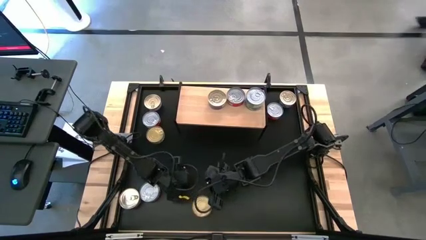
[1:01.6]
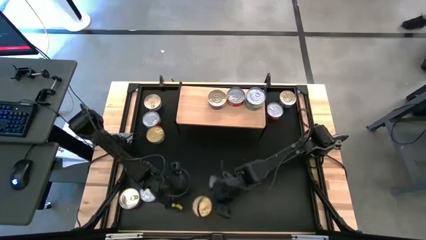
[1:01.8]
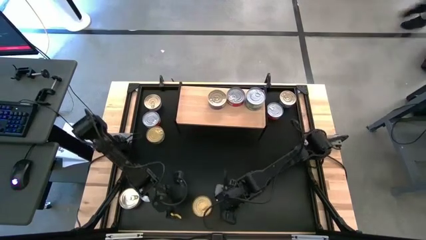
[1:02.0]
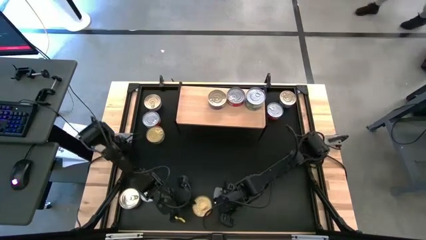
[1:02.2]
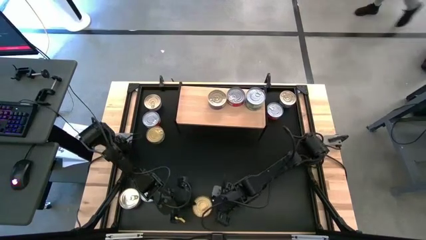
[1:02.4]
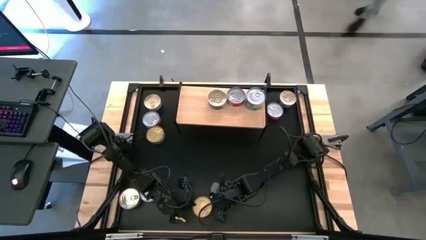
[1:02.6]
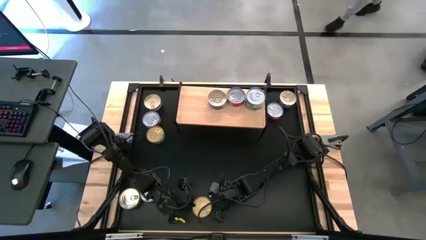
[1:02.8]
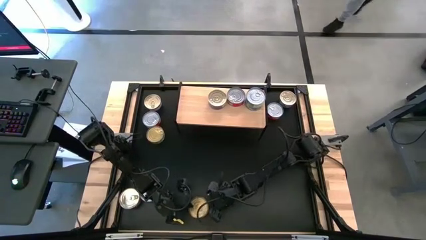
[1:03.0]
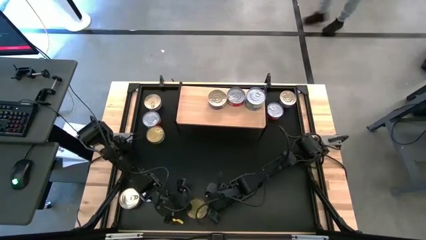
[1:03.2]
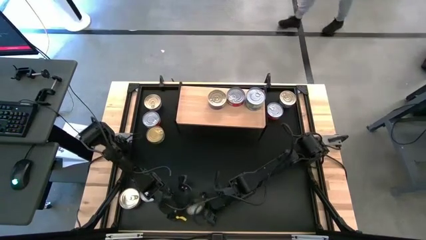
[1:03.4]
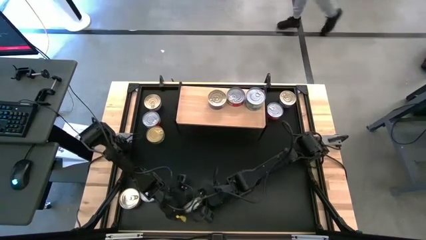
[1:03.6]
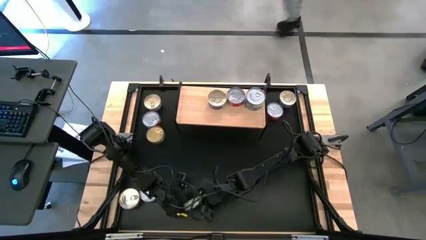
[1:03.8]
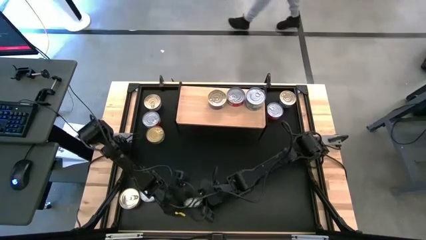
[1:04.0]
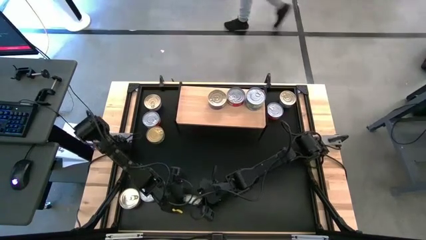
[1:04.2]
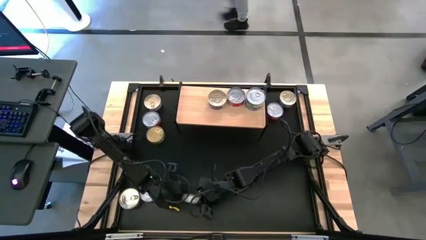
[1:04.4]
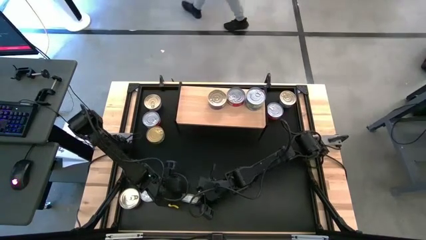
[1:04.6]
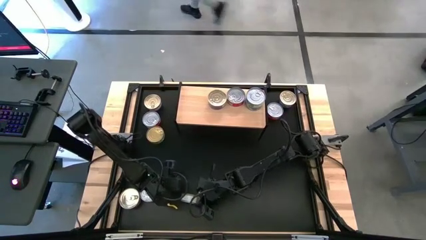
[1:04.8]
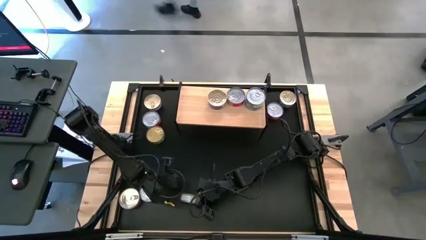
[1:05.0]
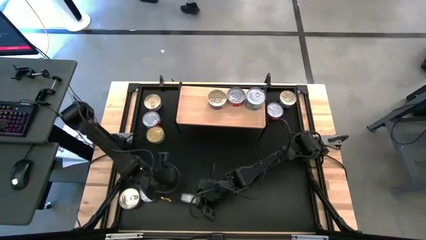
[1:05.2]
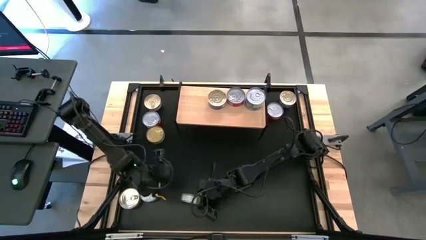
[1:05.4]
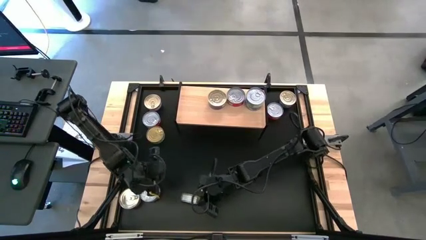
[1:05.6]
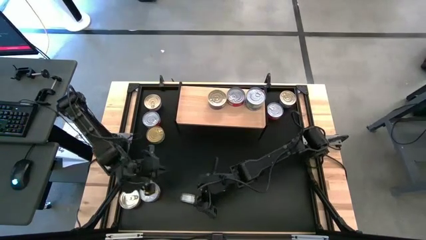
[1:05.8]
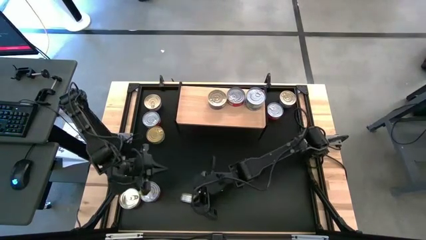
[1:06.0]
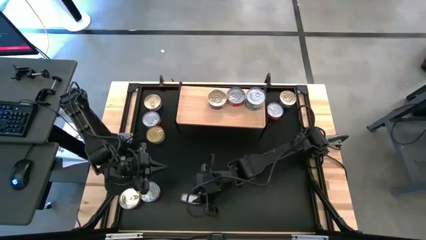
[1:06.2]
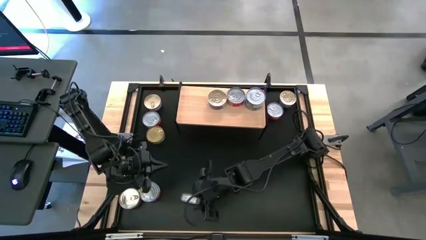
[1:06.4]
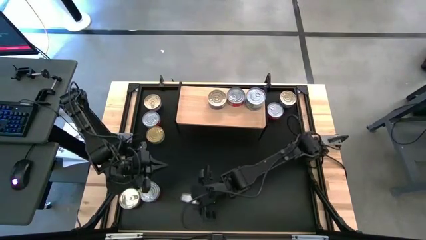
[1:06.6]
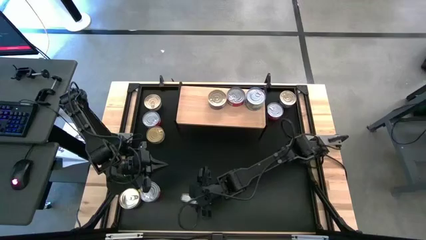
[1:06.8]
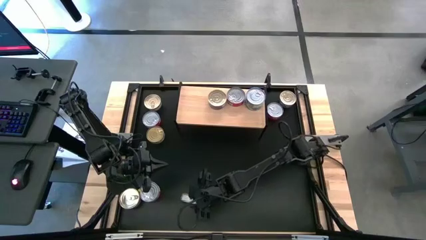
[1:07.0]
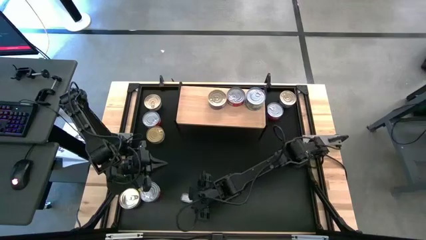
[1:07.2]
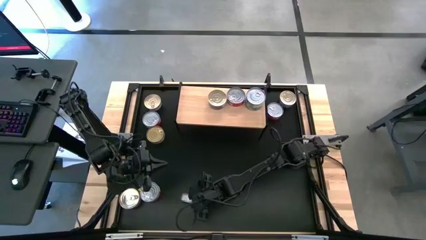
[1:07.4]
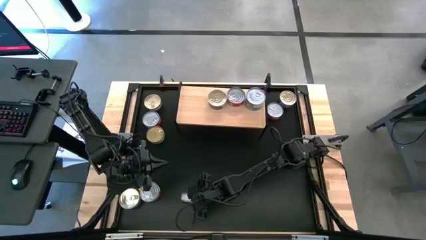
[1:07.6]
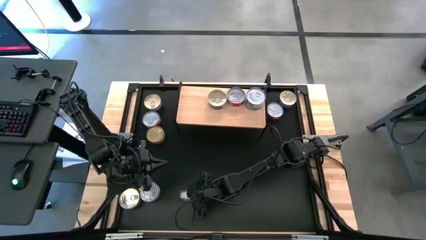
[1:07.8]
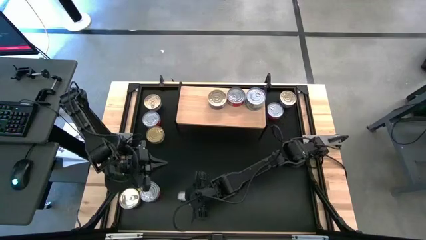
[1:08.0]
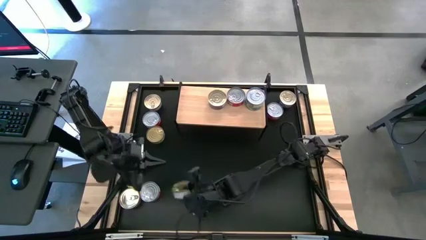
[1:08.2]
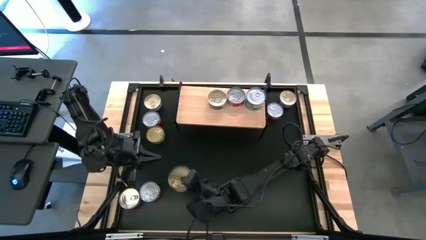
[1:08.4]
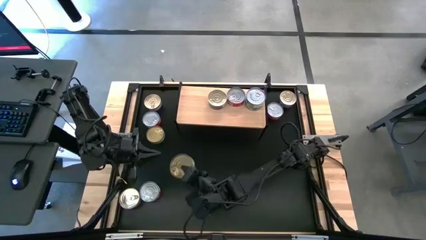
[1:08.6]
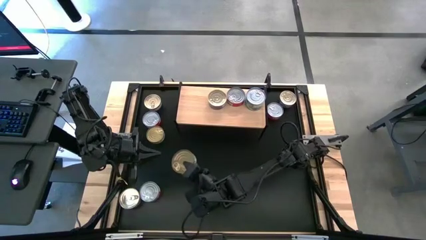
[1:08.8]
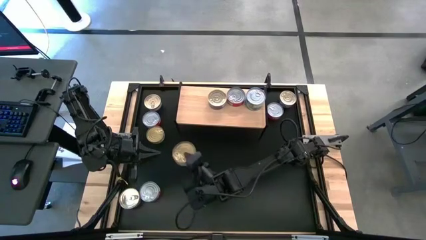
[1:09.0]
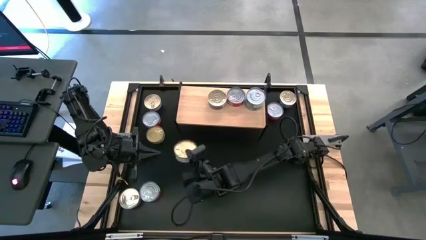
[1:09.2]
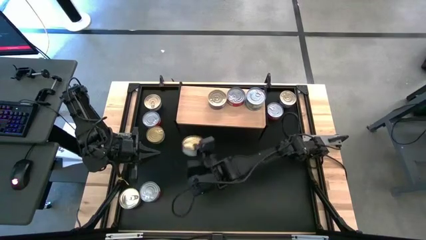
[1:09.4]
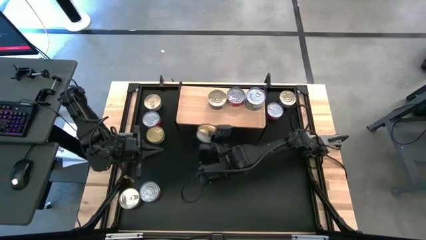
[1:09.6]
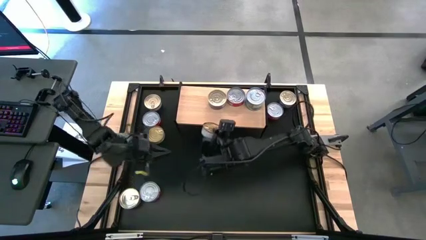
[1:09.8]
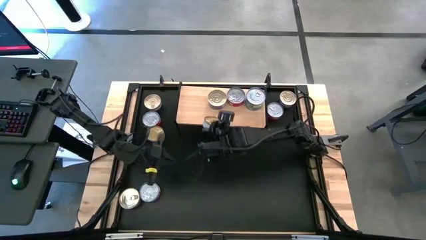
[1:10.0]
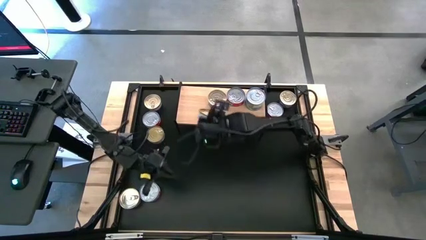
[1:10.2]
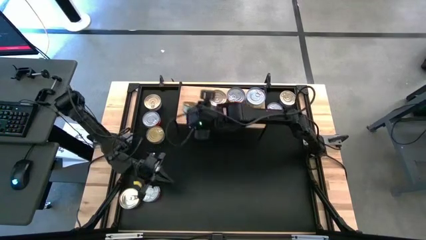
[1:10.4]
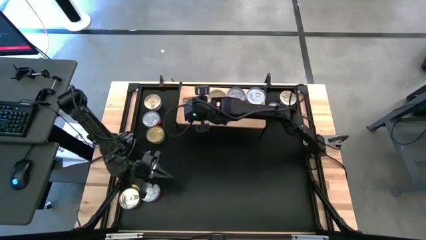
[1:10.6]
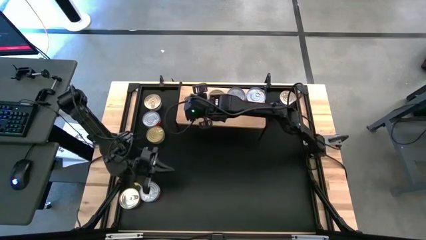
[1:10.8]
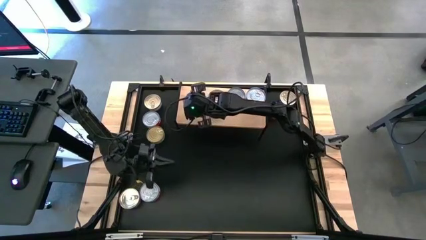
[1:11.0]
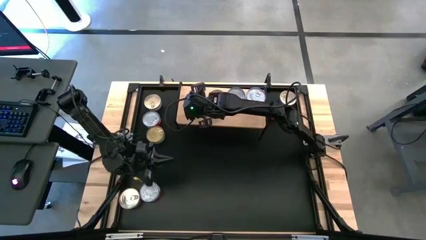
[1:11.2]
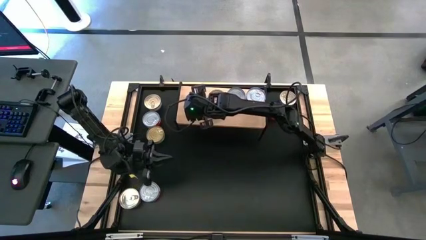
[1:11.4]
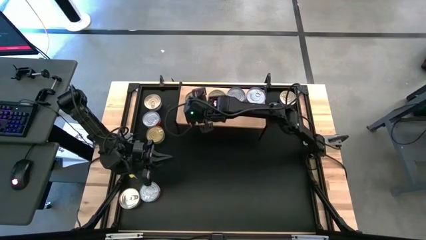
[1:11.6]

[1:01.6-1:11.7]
Task: Stack canned seafood by type on shelf
Put the green tuna can on the shelf
